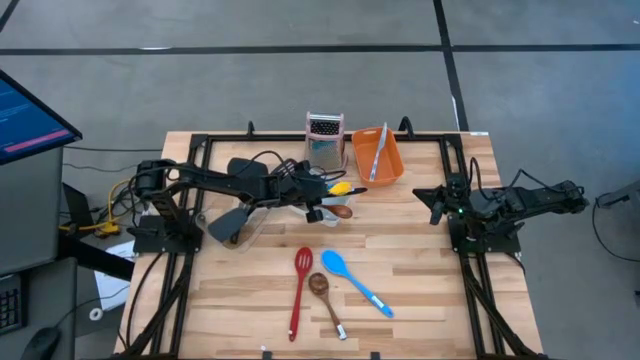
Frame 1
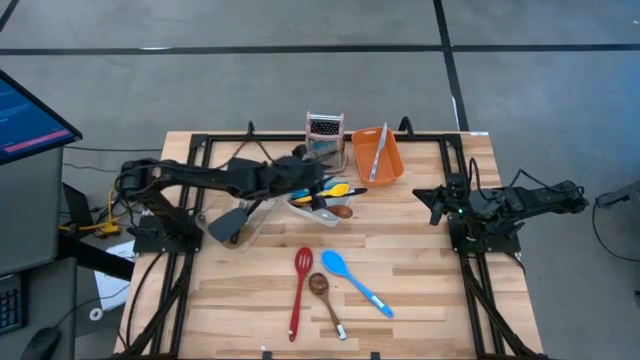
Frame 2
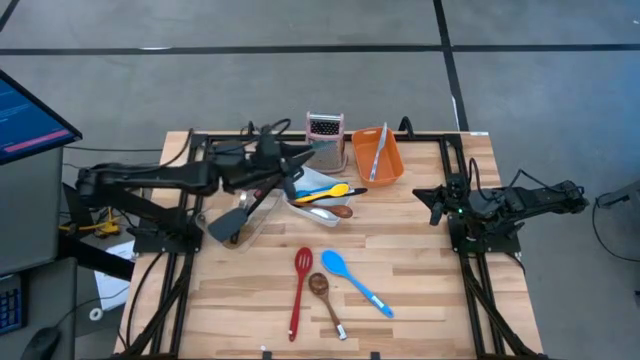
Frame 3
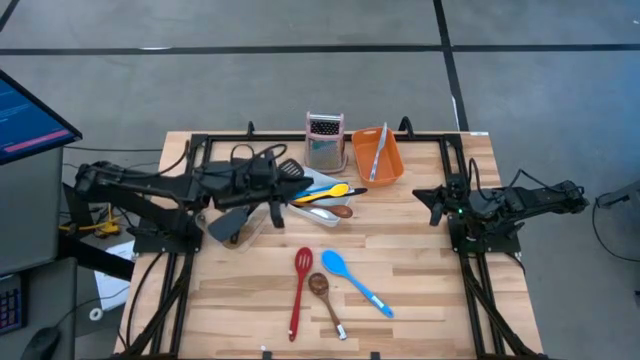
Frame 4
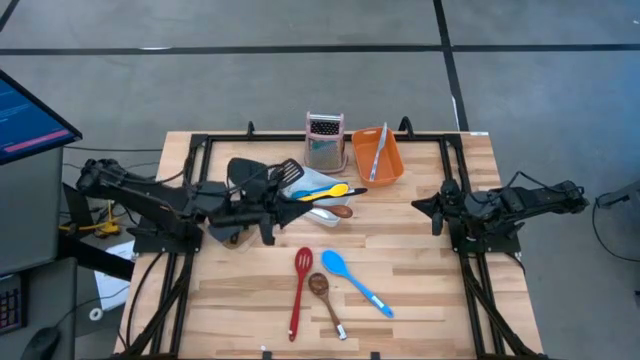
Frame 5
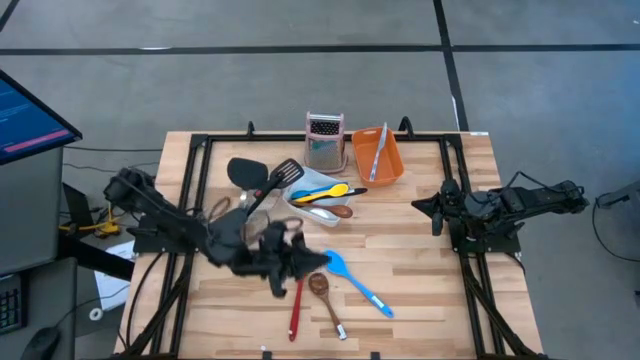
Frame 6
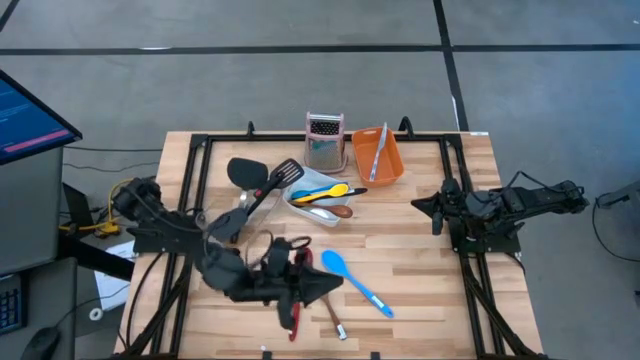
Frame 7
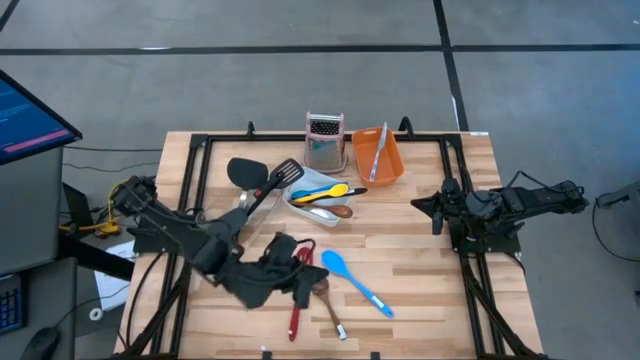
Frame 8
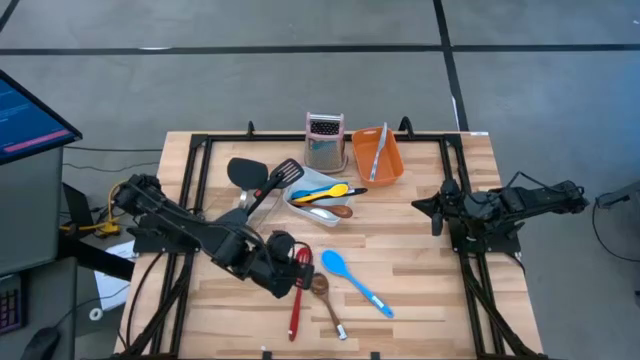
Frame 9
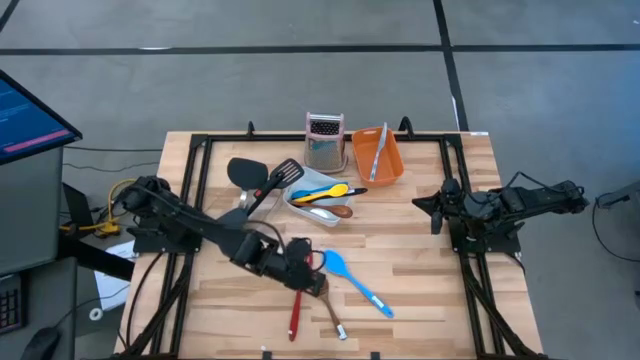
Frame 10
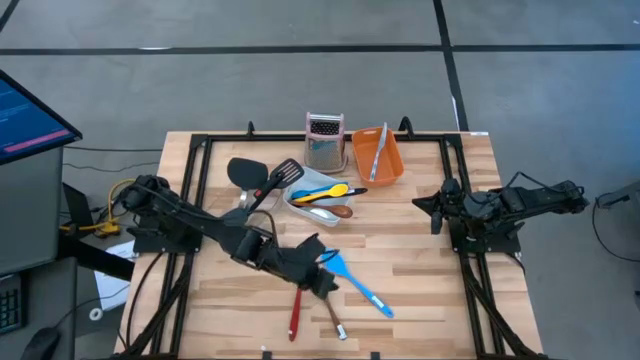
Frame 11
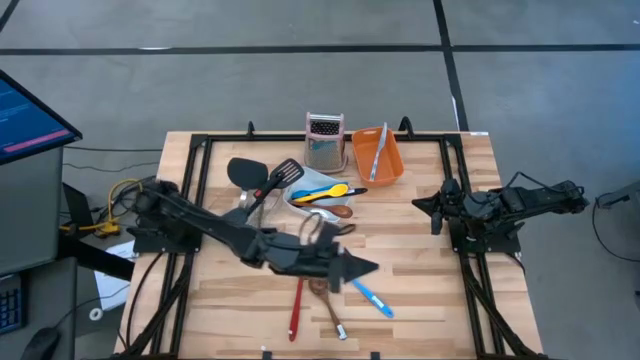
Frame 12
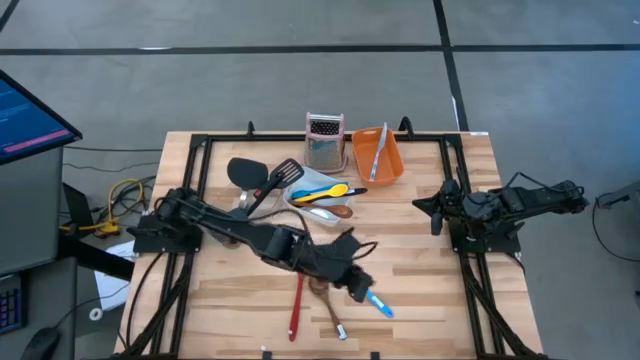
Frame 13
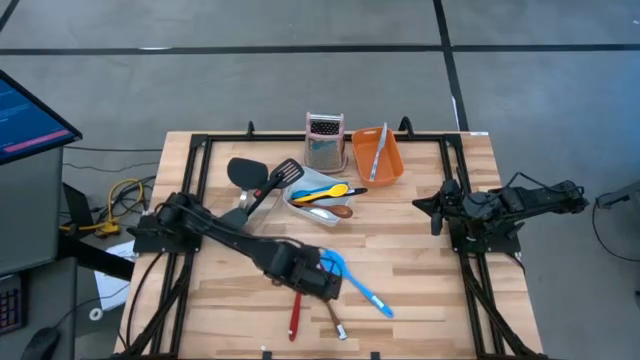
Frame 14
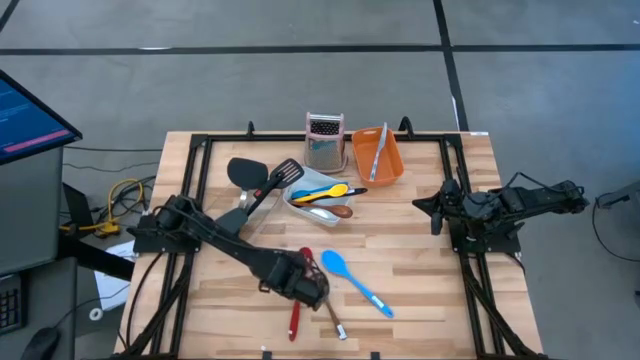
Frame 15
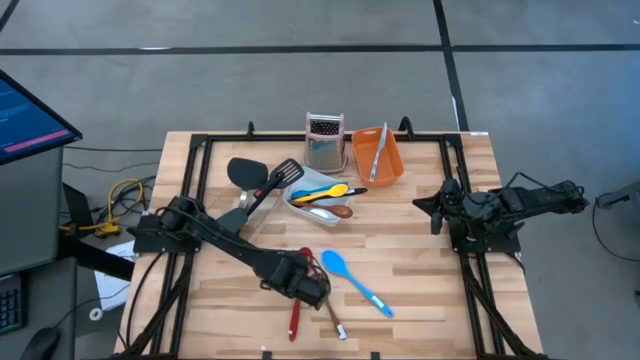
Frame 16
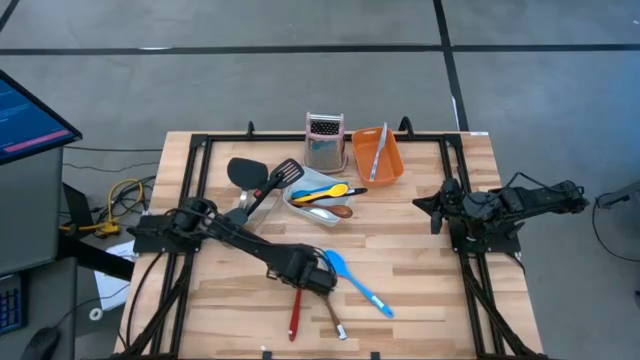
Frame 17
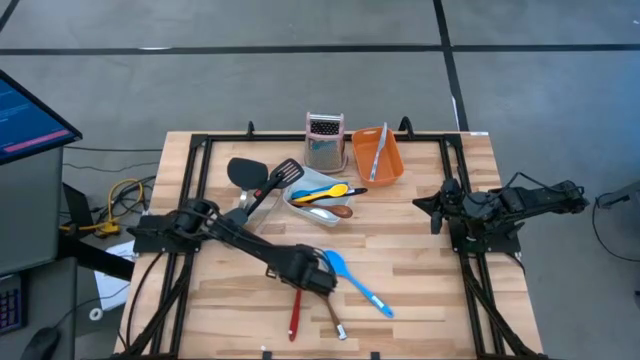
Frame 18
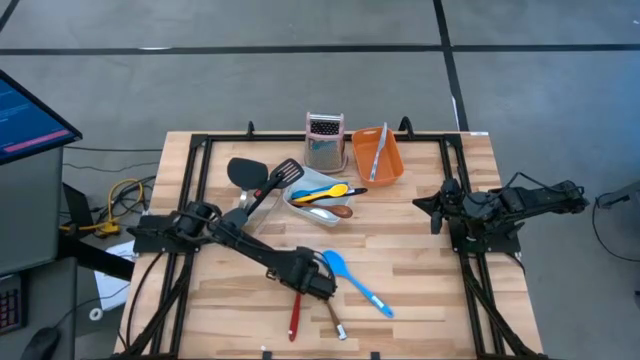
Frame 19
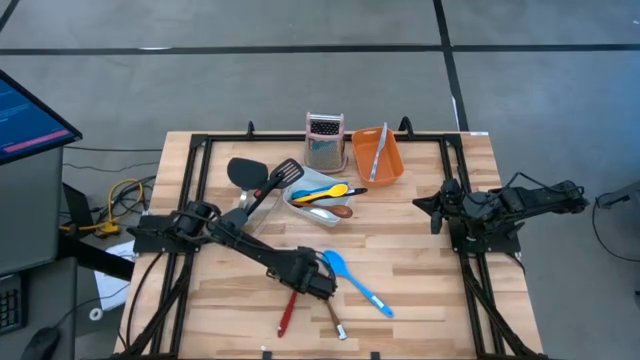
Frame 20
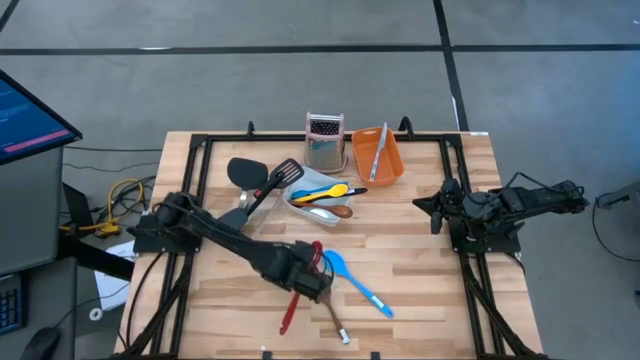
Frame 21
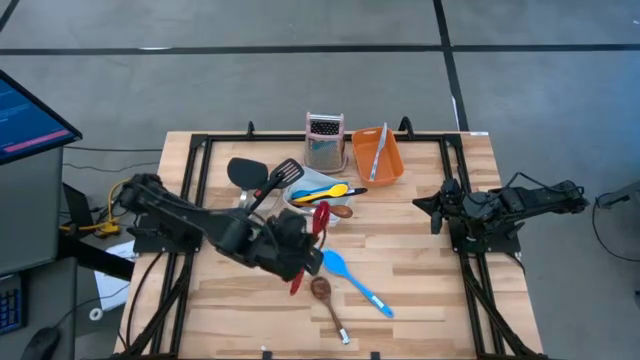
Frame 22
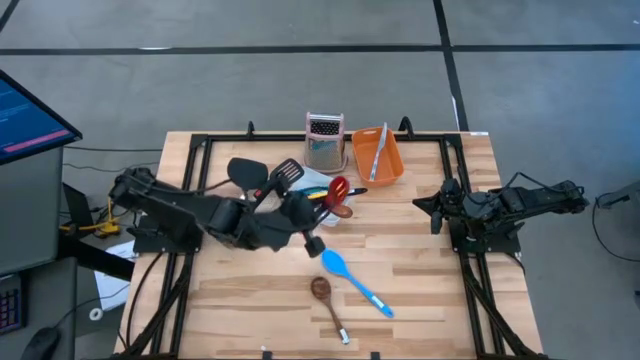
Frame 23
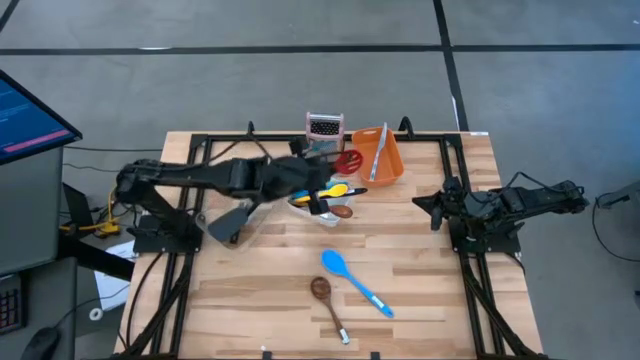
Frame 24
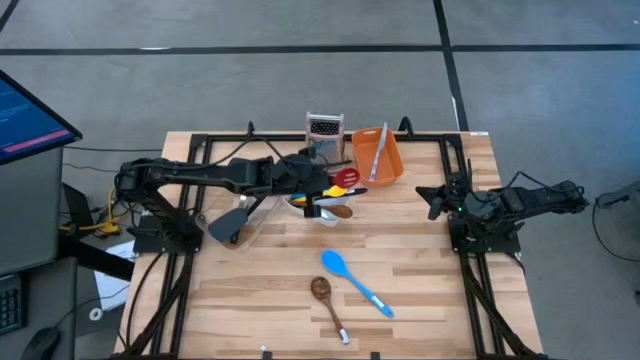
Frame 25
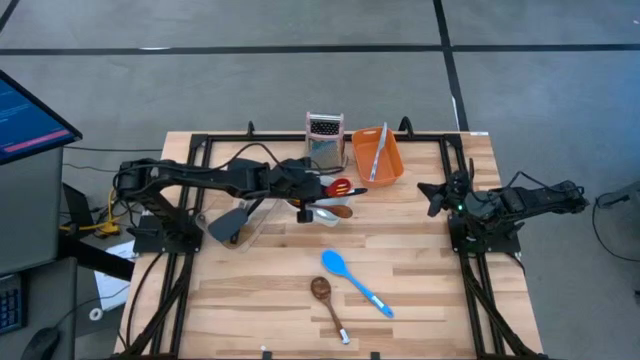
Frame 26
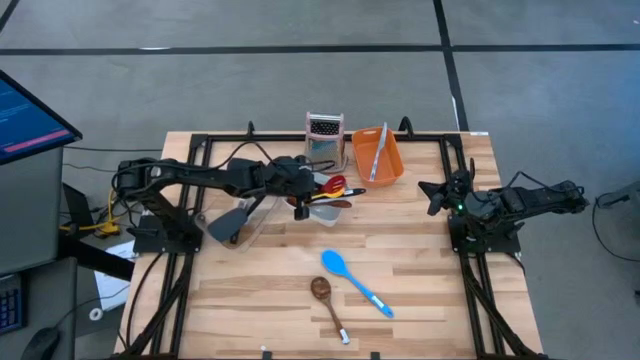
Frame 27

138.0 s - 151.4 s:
Task: Pick & Place Kitchen Items
Put the red slotted spoon into the white bin

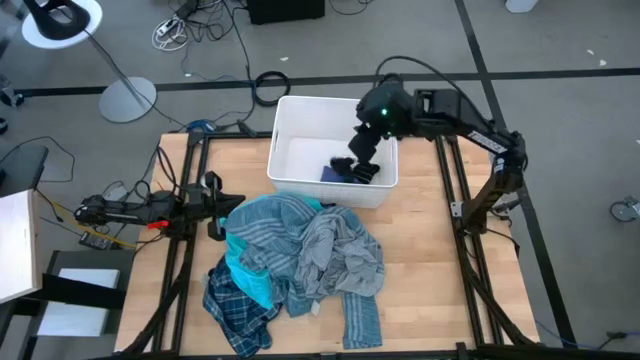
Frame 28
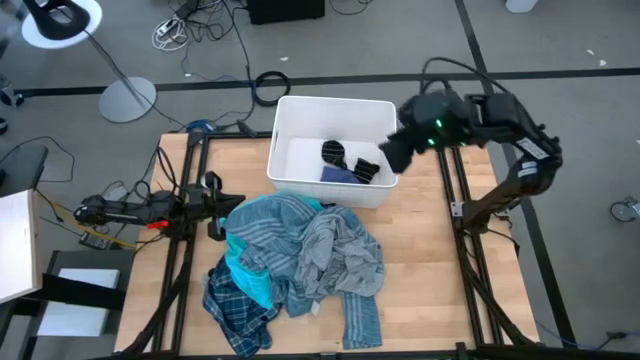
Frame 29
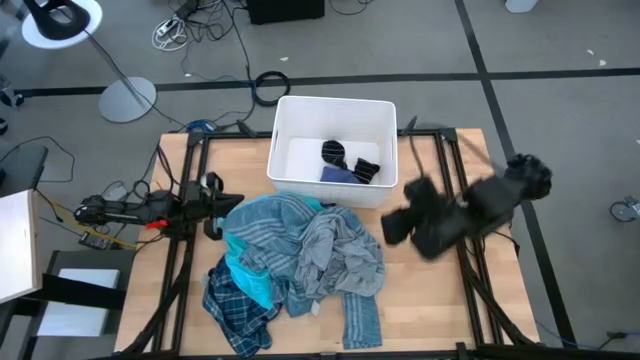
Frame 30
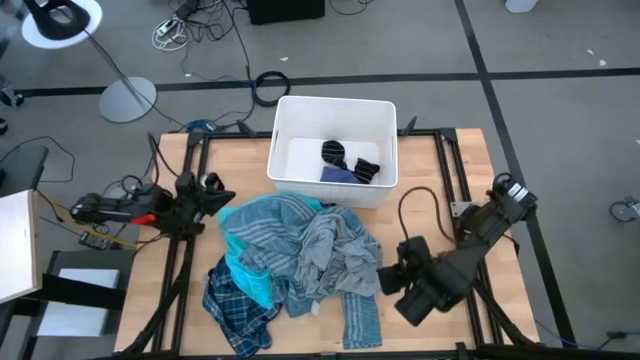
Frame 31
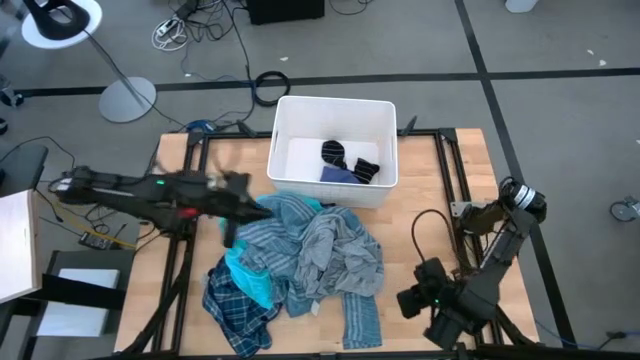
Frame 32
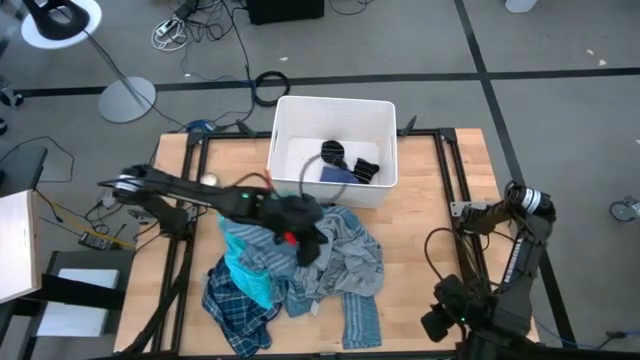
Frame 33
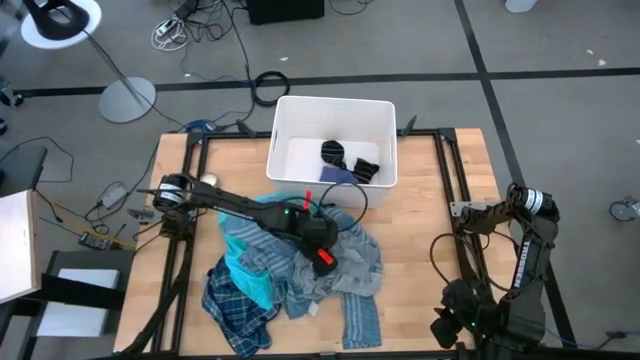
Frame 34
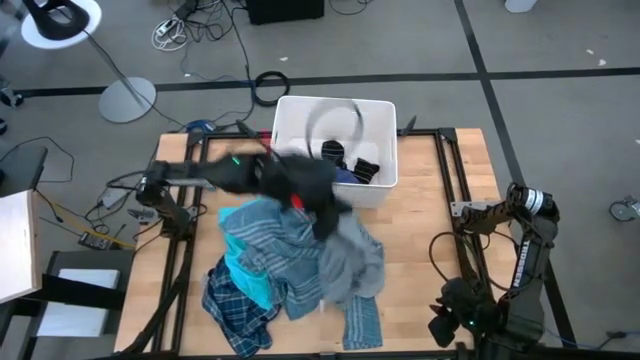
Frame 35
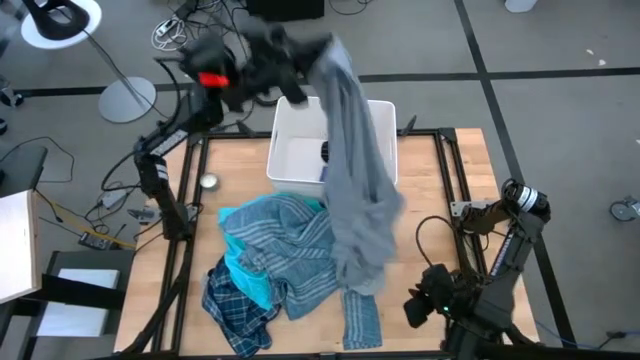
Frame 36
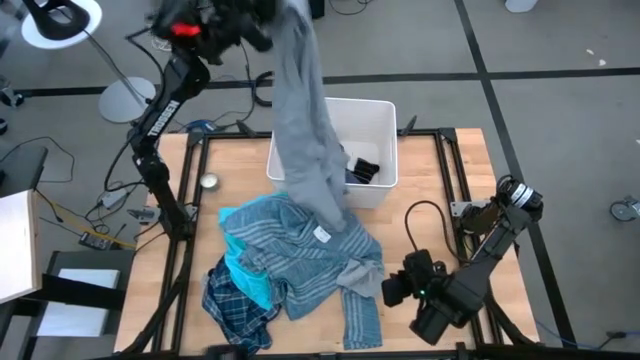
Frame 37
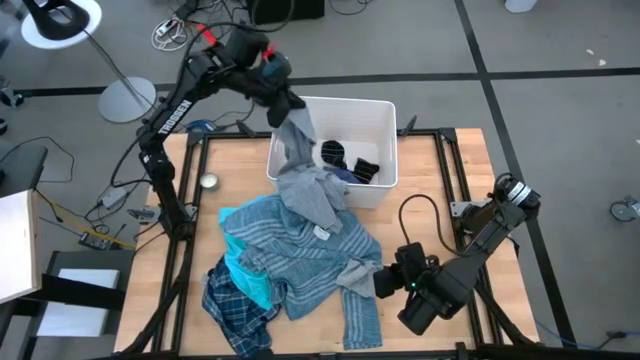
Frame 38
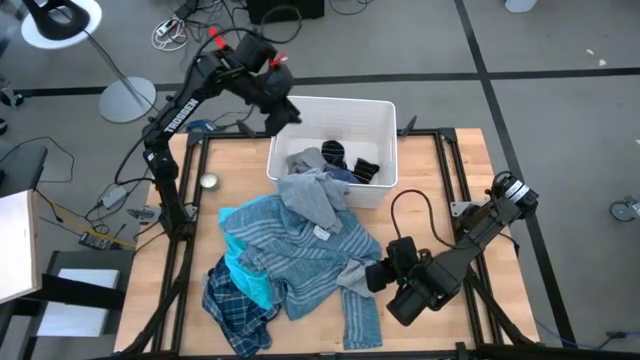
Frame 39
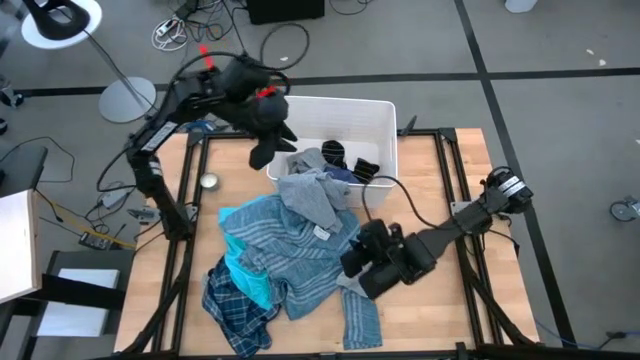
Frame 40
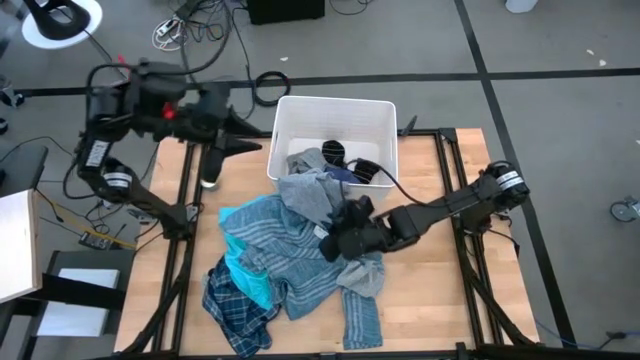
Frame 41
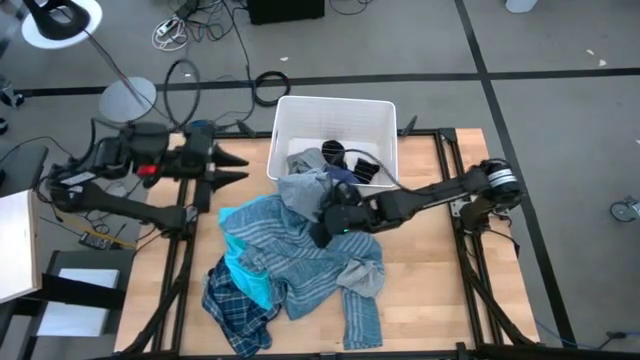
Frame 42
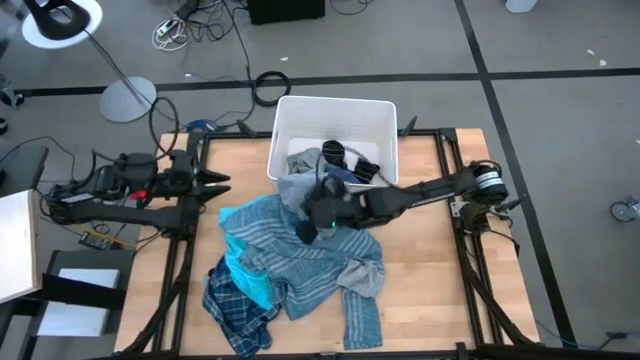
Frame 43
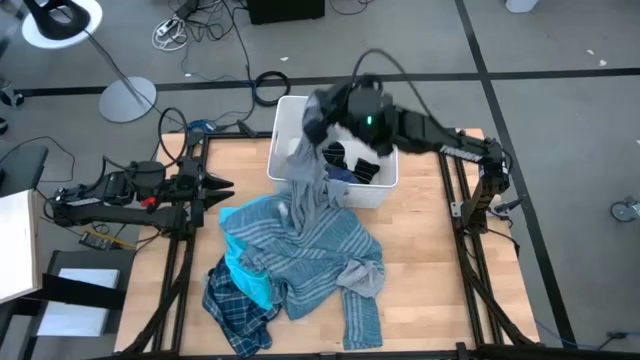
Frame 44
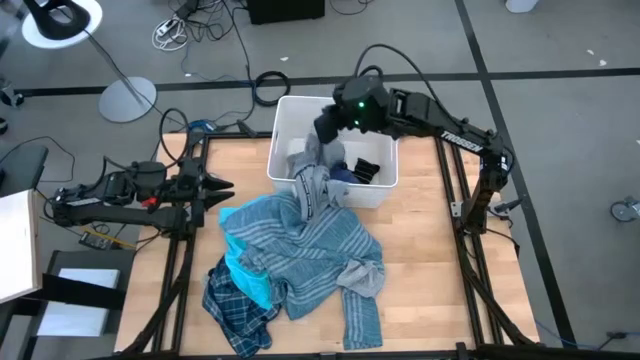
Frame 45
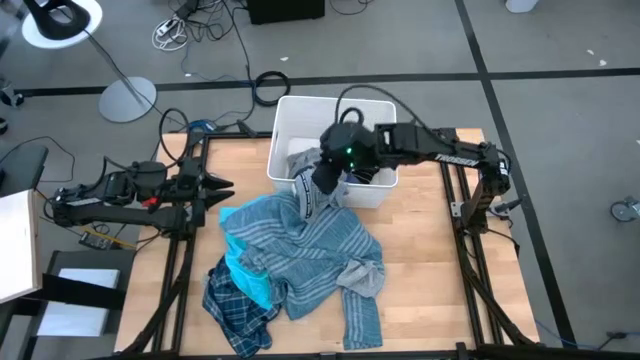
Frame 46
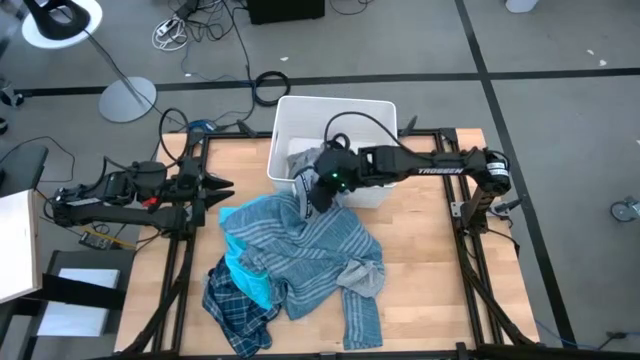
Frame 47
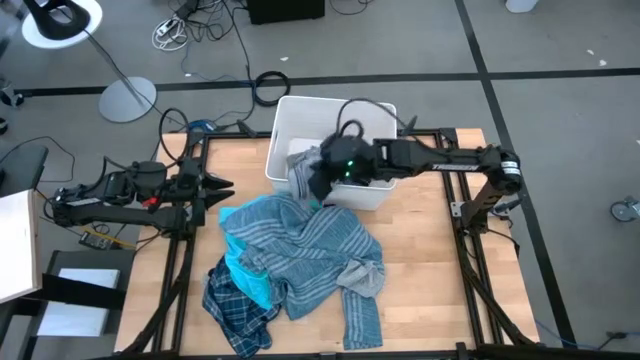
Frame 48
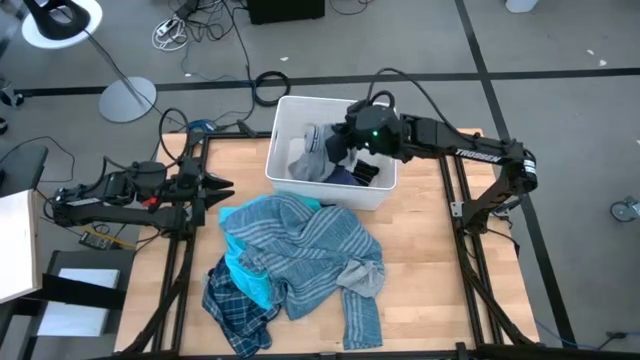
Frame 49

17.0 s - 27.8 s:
Task: Sort clothes
Put the gray shirt into the white bin
